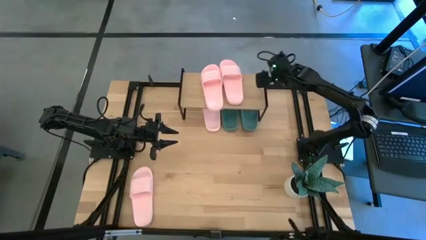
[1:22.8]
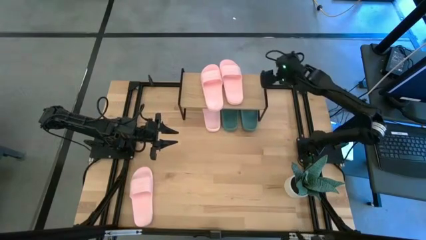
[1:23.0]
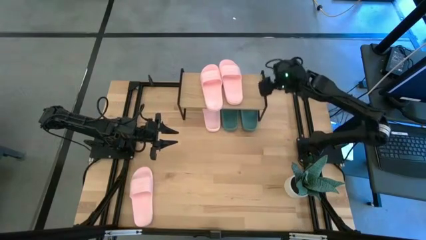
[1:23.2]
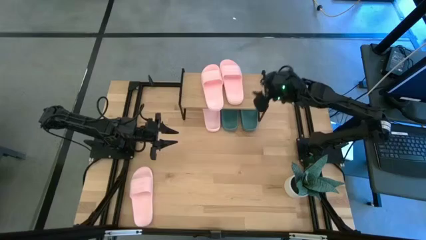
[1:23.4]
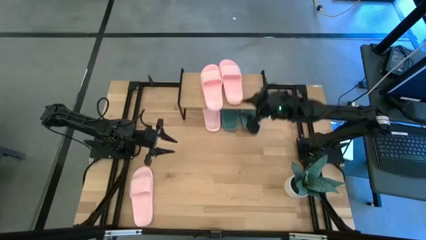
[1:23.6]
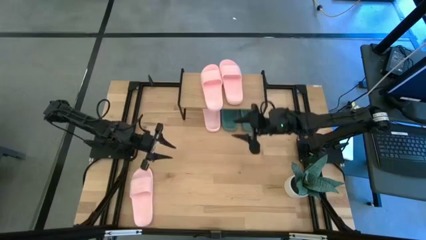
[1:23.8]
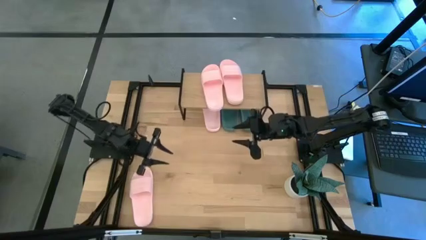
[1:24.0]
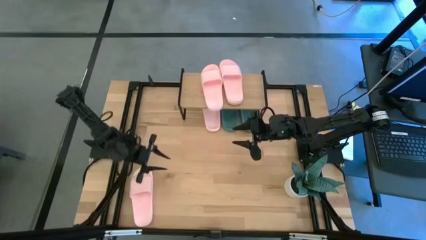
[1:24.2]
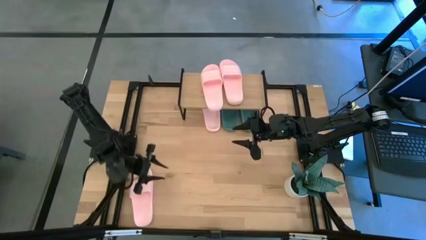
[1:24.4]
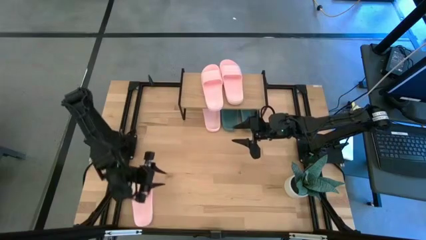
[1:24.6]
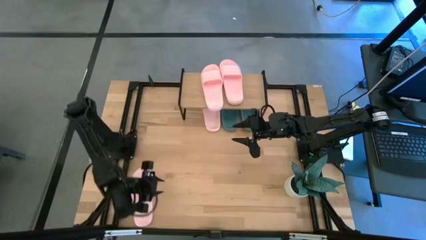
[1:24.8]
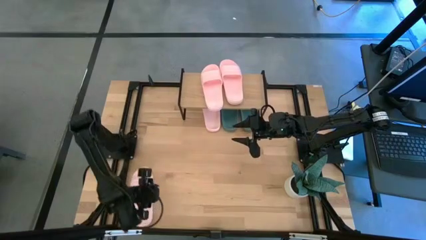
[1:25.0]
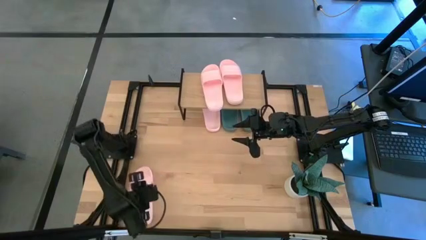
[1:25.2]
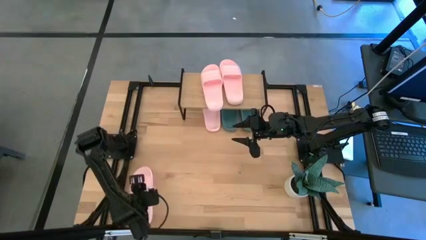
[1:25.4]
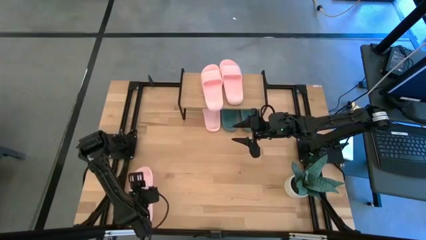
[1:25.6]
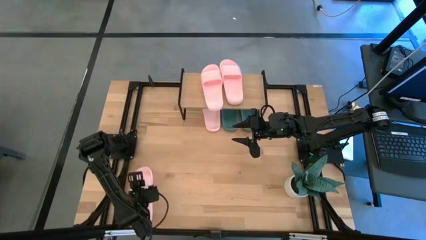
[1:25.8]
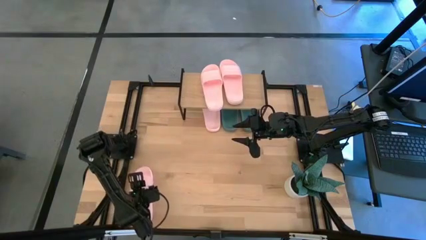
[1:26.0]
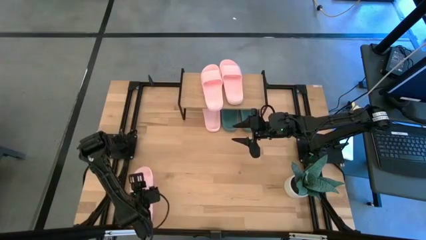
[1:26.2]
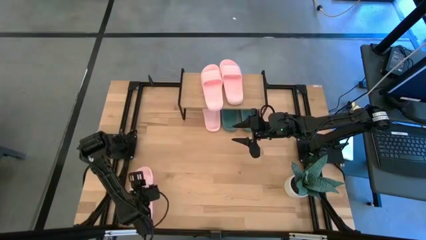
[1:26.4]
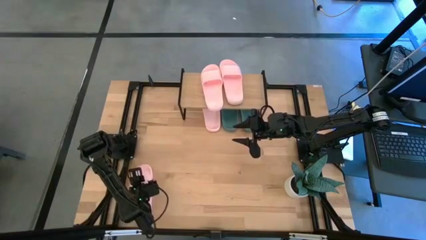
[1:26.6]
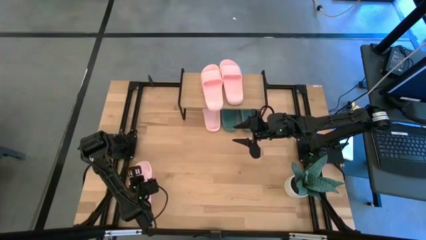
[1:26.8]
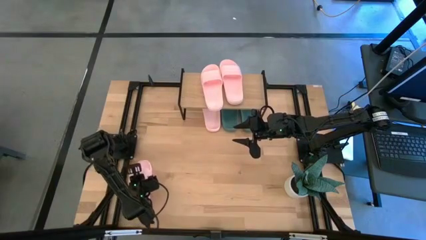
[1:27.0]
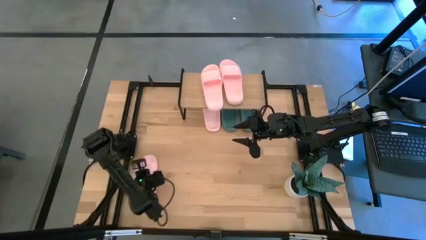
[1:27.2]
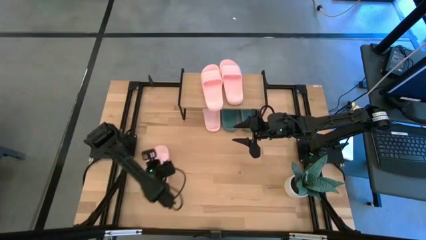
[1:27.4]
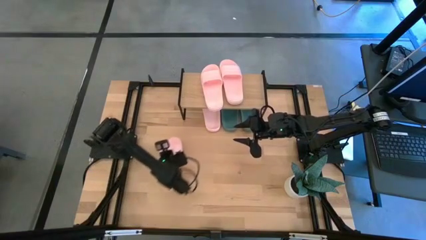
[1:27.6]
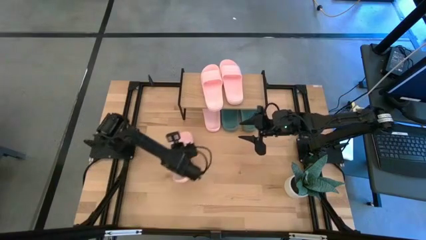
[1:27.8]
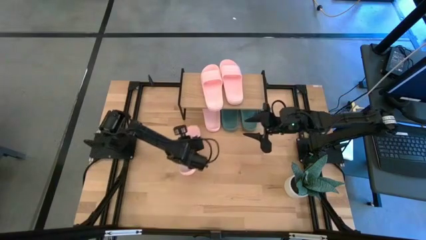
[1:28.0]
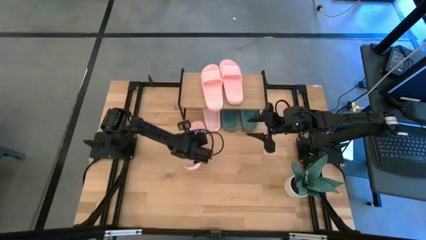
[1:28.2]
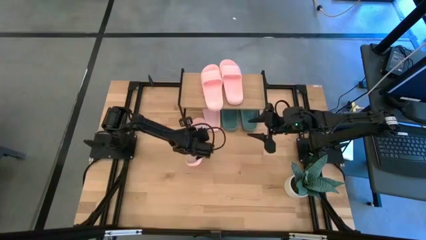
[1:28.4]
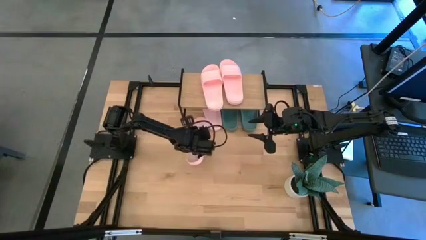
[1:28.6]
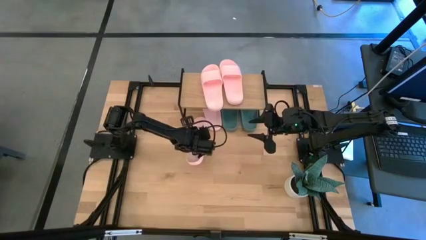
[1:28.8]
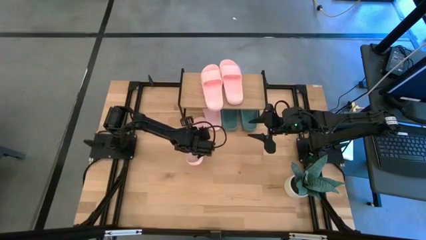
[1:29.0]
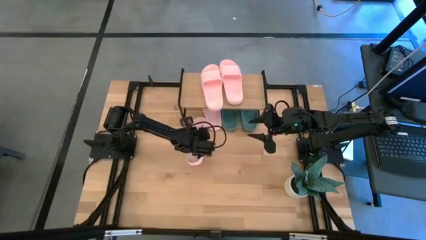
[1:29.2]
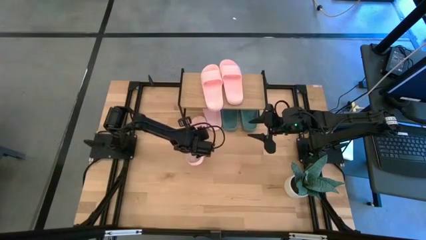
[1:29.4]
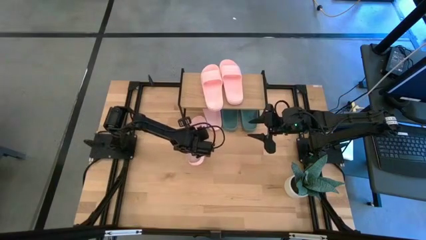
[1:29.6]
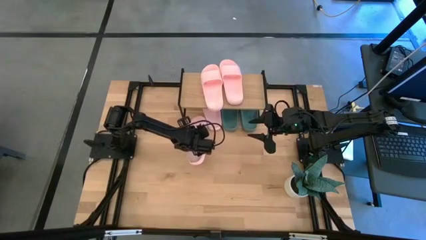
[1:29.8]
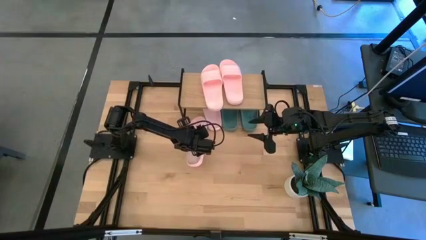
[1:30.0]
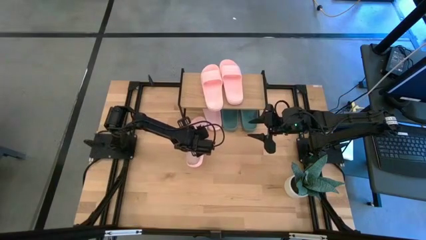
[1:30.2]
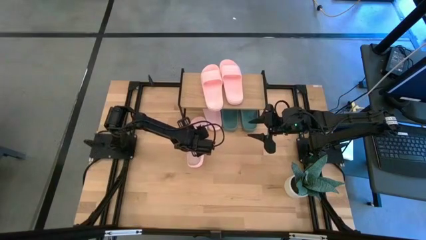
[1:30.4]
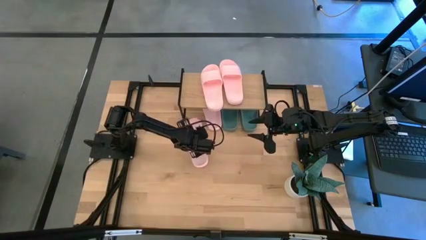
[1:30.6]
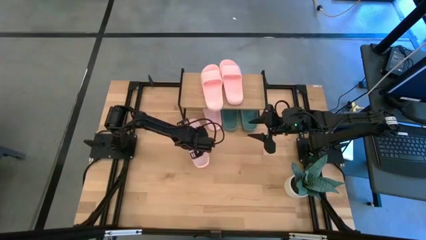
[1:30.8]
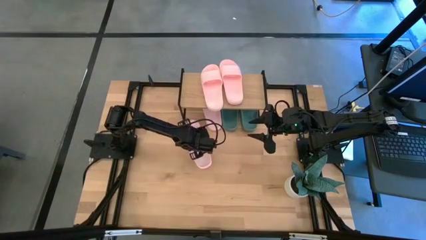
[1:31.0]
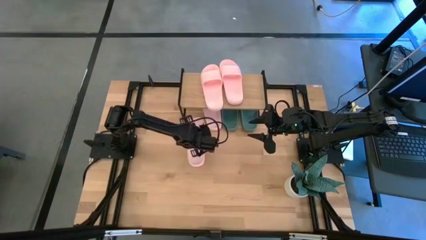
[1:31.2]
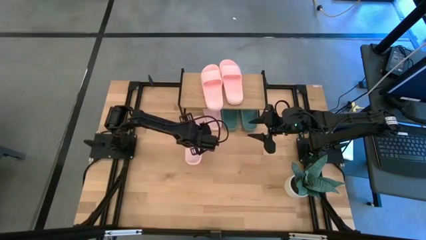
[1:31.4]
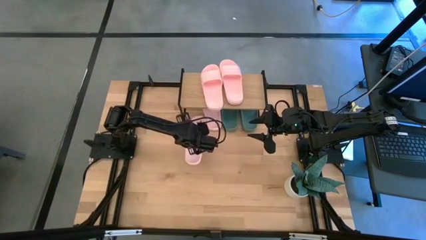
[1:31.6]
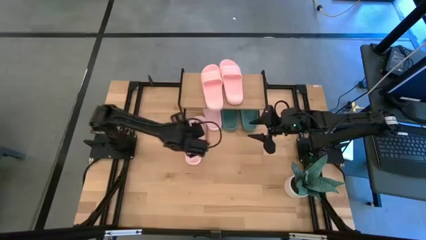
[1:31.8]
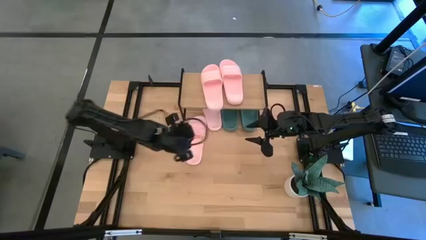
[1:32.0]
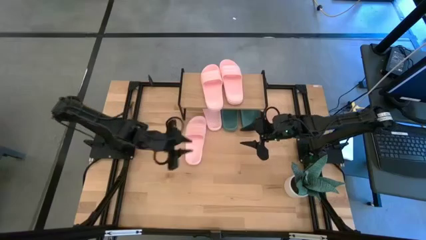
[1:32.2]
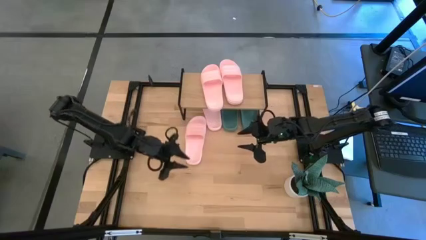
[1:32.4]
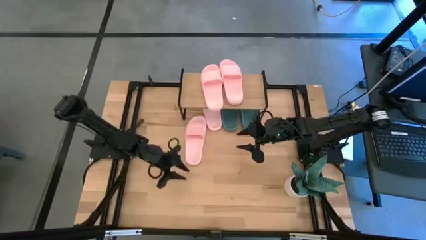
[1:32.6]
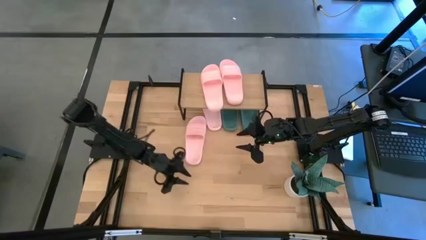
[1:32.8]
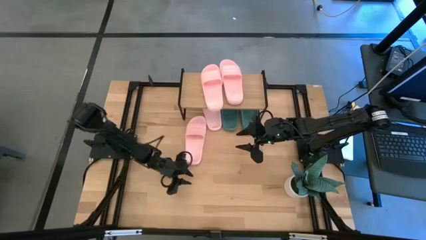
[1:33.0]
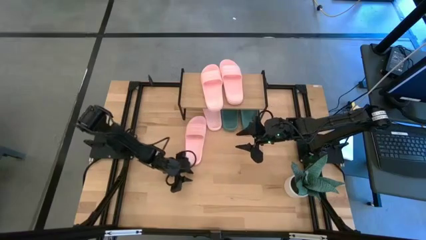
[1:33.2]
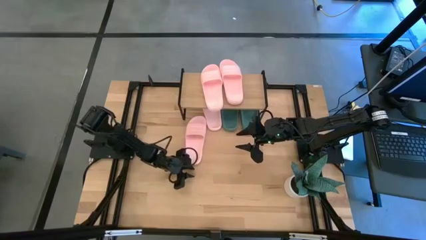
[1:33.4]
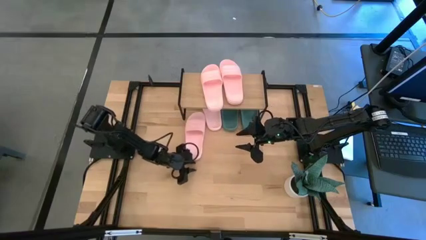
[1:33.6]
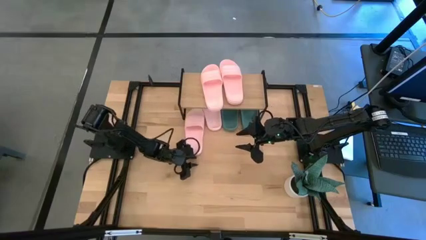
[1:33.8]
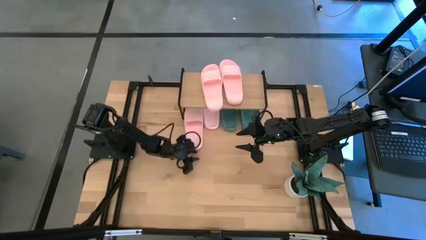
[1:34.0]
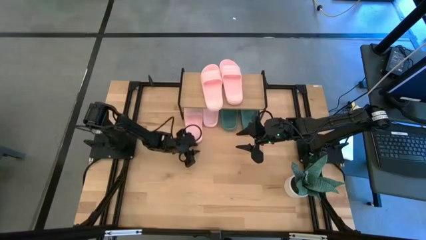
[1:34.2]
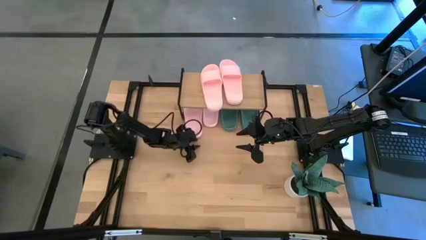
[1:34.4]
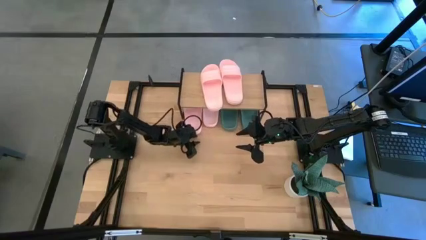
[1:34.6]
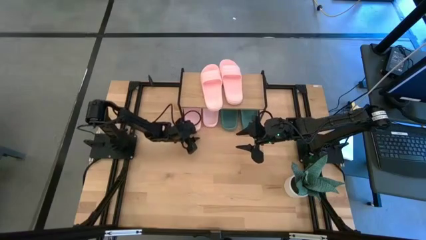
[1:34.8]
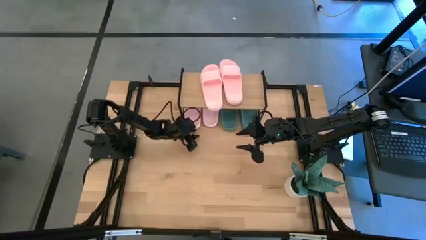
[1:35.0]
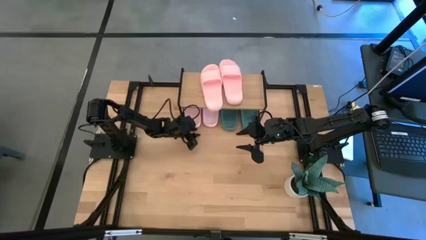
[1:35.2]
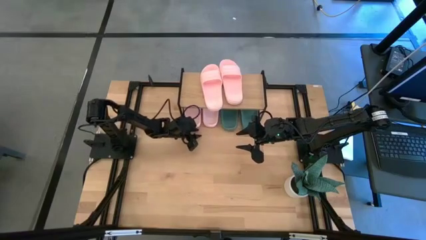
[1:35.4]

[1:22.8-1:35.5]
Task: Pick and place slides into the shelf
Put the pink slipper under the shelf
